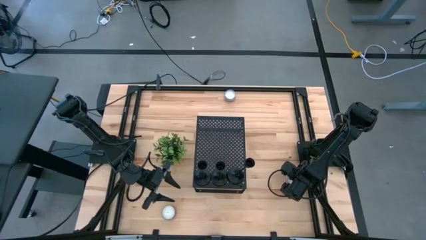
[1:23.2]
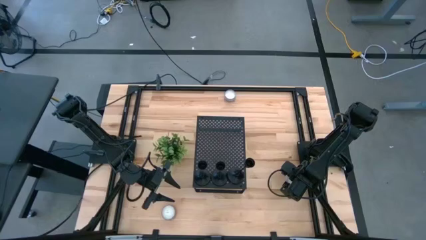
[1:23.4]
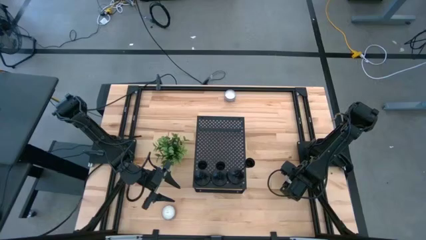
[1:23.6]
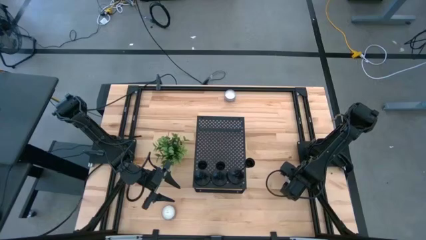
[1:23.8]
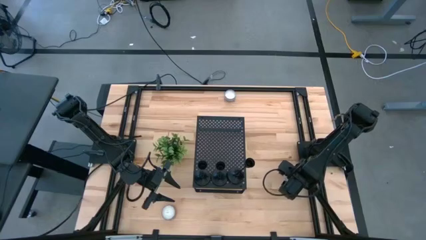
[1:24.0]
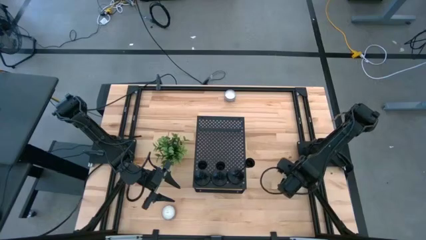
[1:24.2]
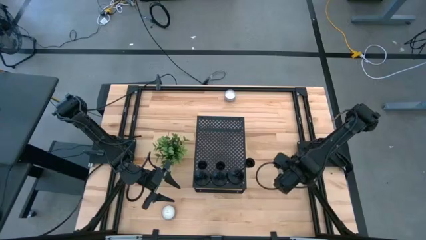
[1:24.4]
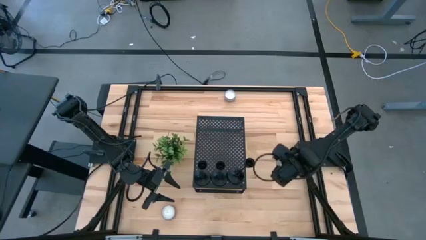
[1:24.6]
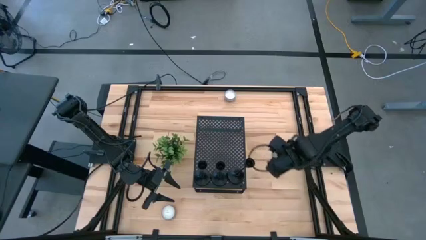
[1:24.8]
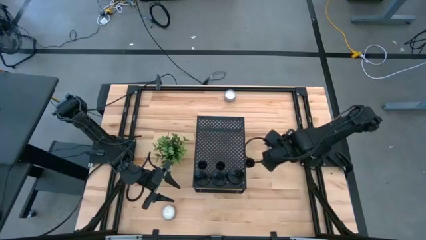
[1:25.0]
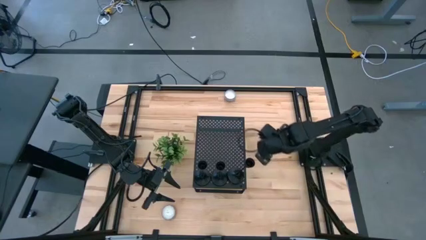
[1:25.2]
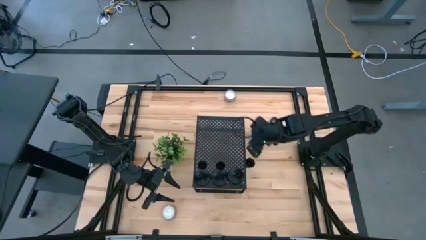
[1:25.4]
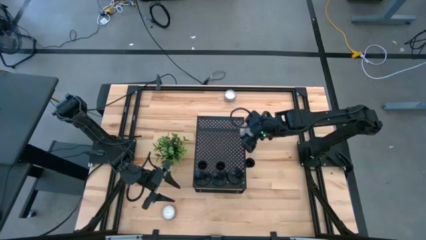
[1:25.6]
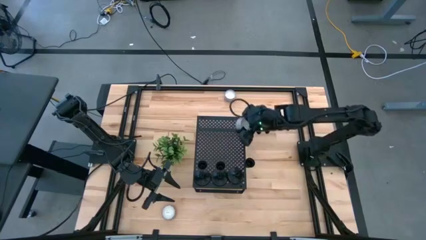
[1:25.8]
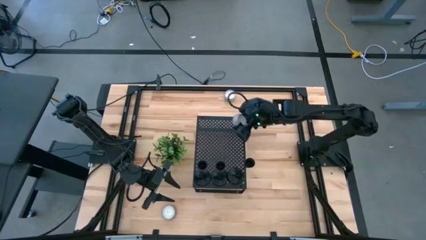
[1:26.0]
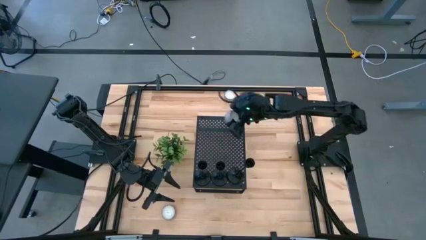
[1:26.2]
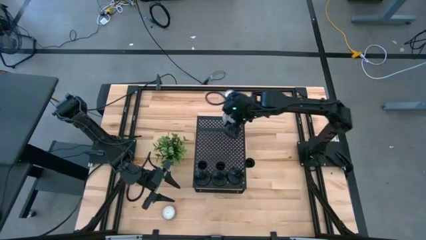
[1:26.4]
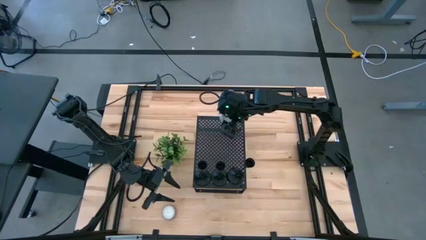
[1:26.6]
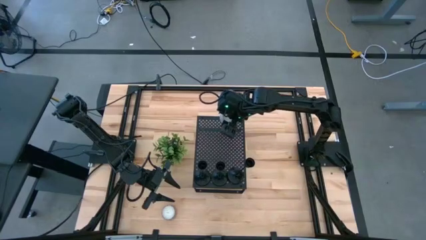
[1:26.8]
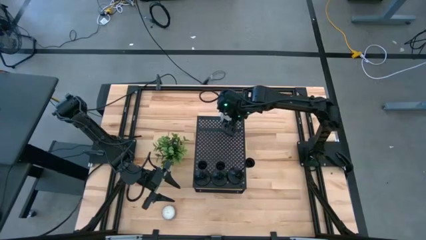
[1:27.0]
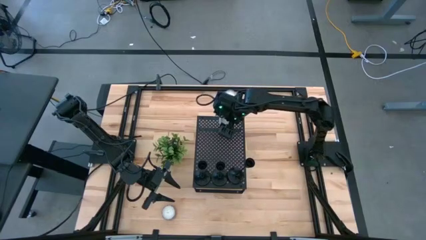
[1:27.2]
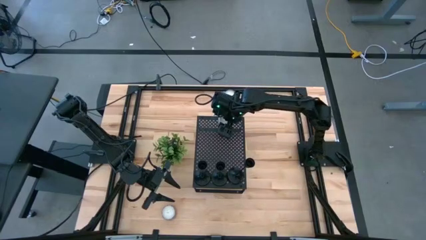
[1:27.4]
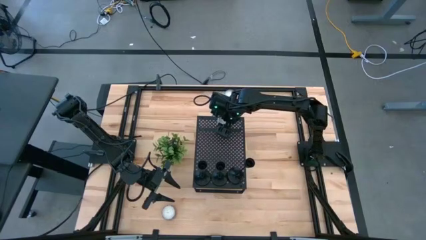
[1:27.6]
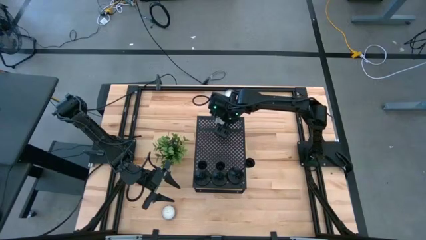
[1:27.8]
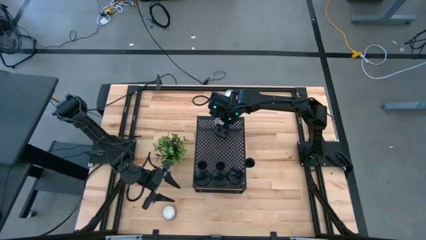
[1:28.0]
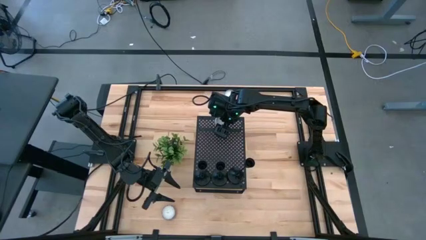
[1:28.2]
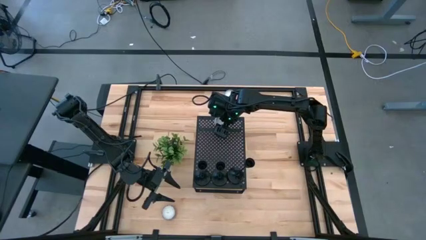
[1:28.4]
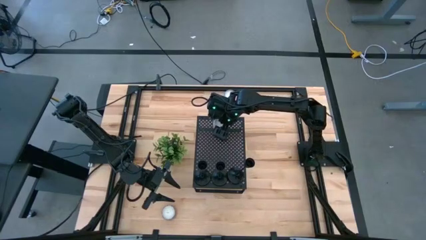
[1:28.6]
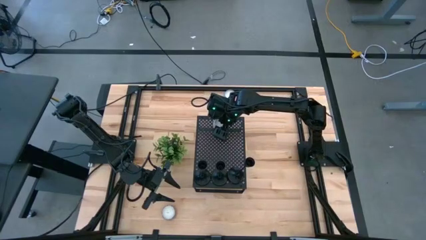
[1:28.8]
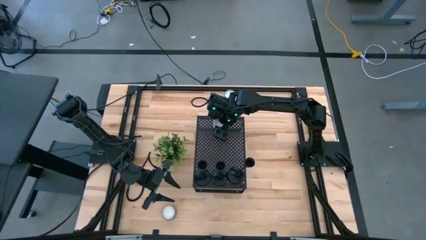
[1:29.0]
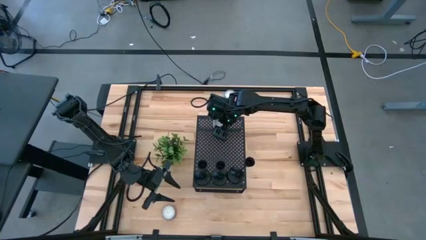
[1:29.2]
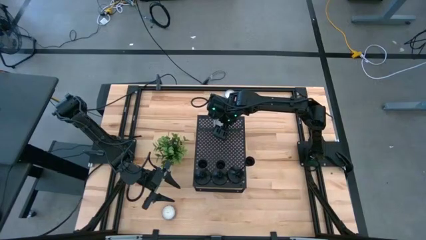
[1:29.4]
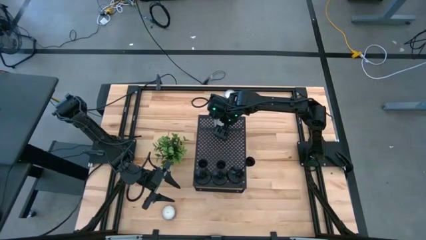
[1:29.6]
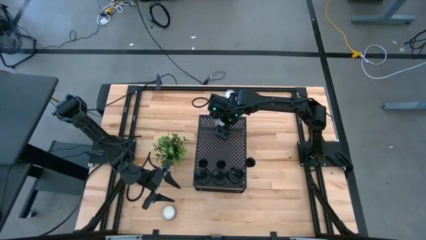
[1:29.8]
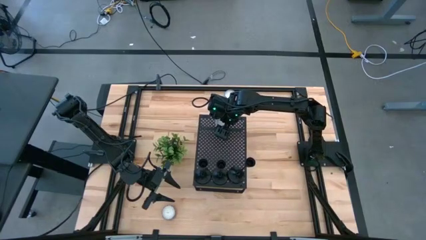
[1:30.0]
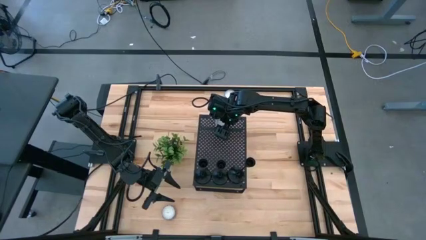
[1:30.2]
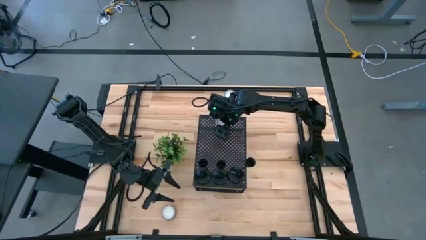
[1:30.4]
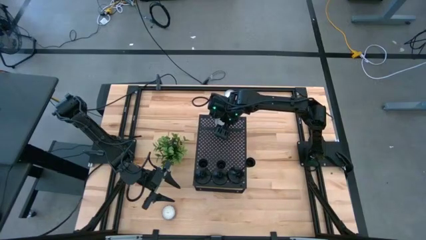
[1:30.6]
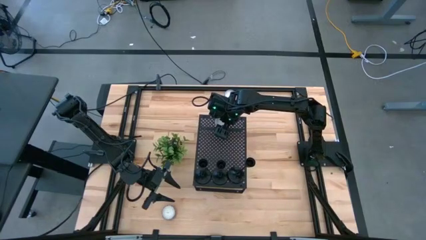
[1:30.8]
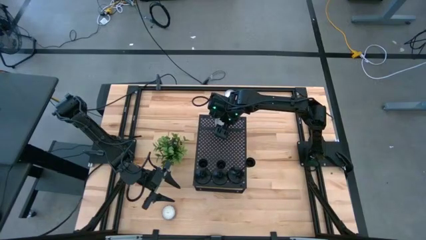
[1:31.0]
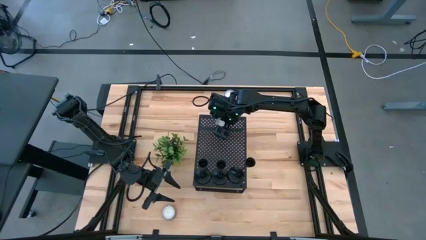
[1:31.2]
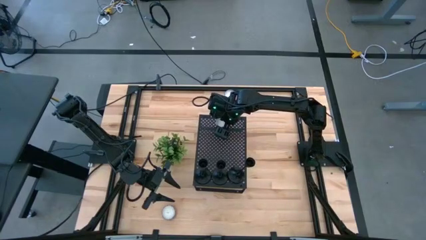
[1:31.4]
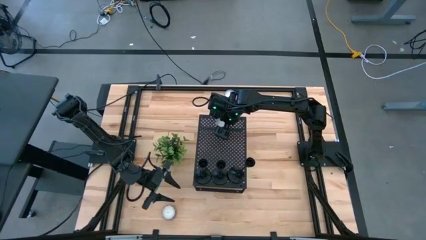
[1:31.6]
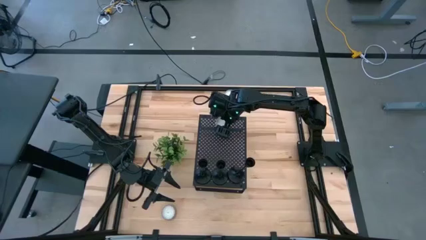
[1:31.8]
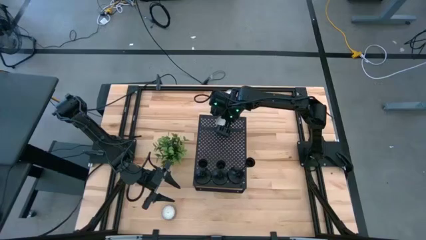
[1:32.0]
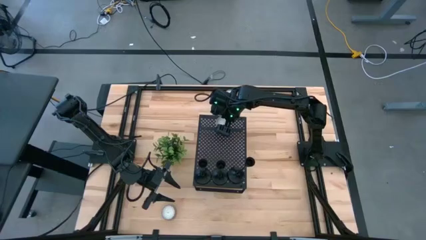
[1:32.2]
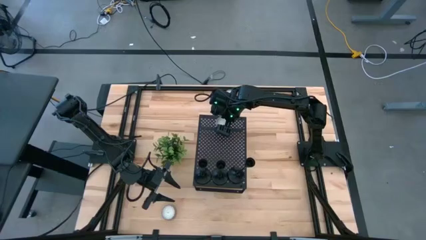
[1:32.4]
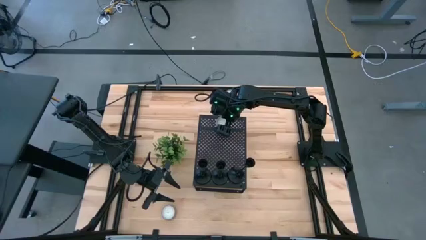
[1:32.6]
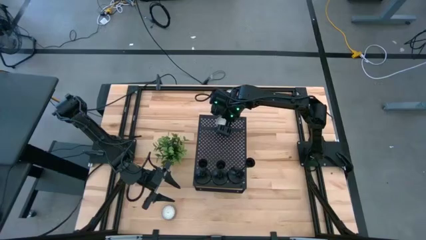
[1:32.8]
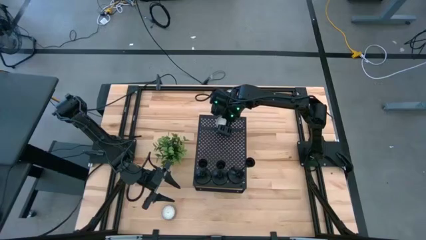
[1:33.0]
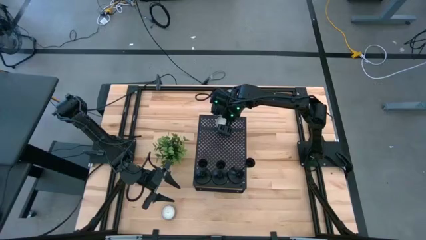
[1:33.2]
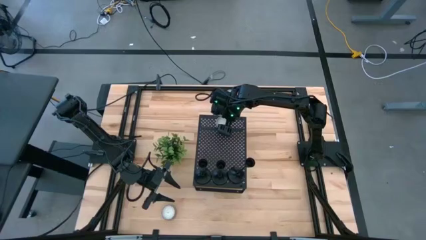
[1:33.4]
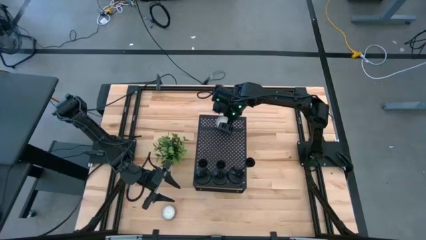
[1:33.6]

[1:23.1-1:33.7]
Task: Pick & Place candle stick holders
Put the blue patterned candle on the shelf

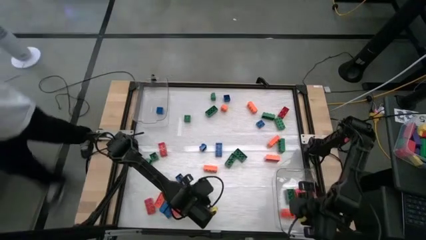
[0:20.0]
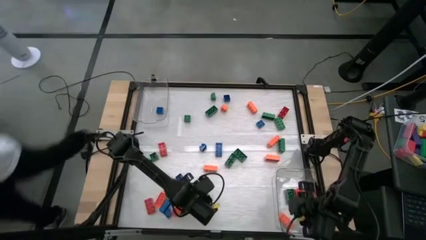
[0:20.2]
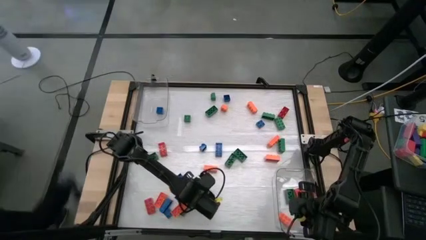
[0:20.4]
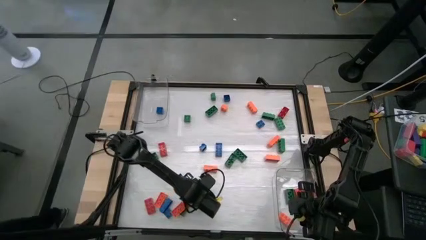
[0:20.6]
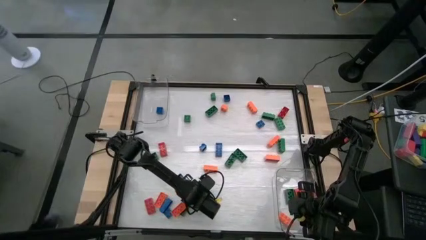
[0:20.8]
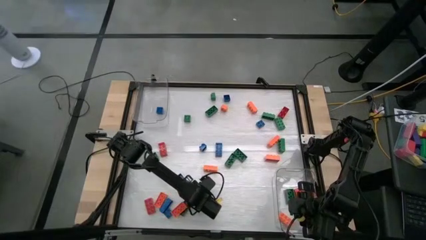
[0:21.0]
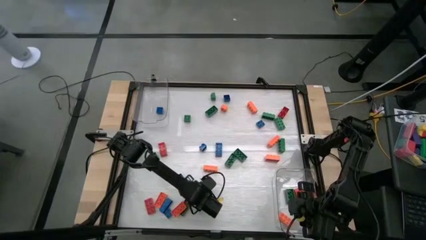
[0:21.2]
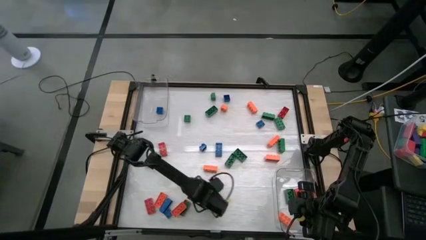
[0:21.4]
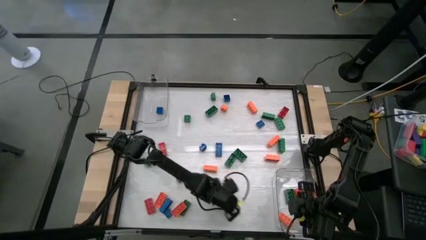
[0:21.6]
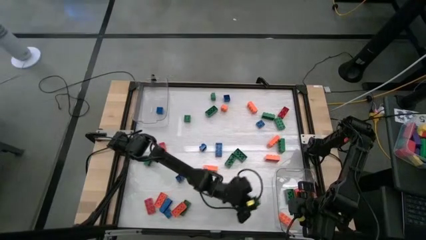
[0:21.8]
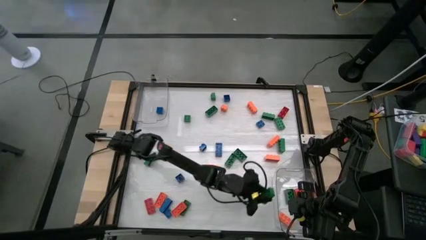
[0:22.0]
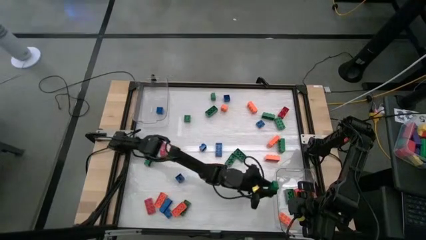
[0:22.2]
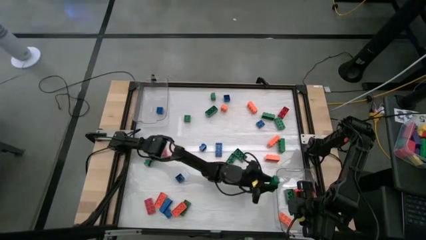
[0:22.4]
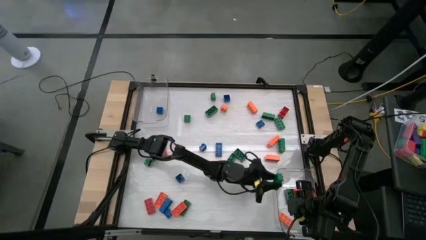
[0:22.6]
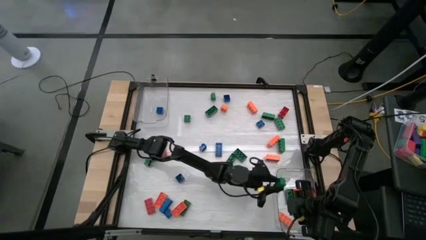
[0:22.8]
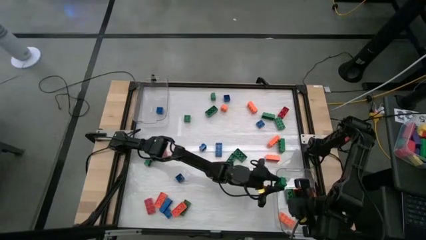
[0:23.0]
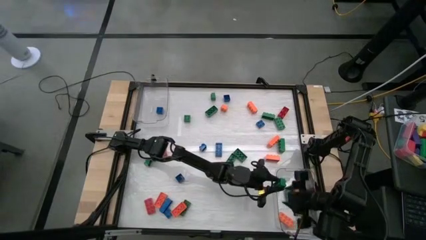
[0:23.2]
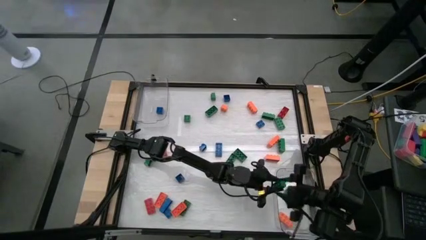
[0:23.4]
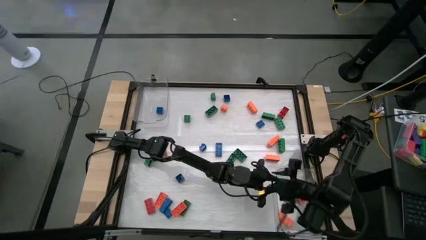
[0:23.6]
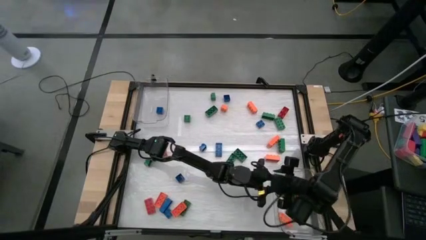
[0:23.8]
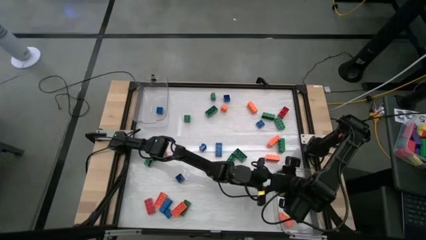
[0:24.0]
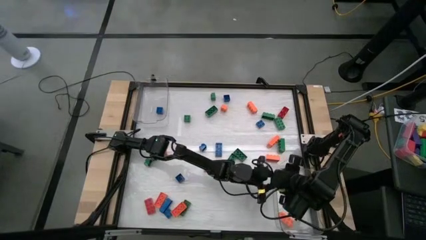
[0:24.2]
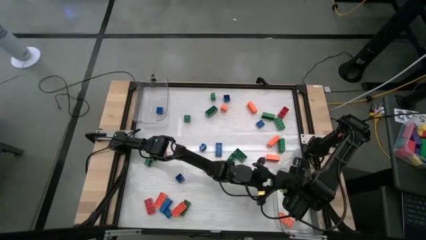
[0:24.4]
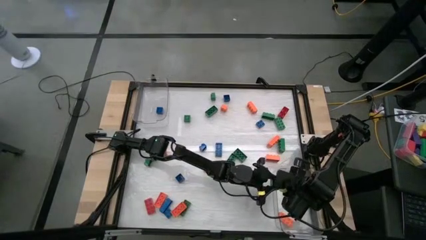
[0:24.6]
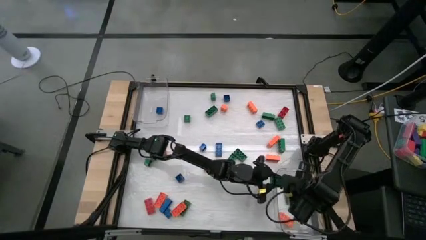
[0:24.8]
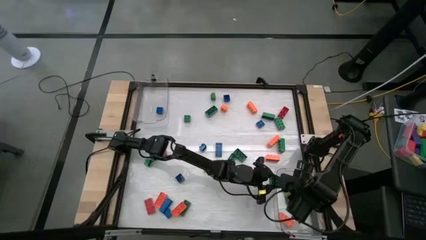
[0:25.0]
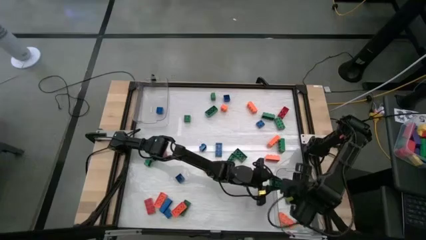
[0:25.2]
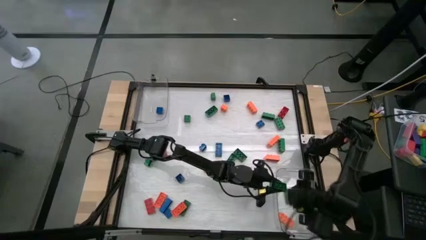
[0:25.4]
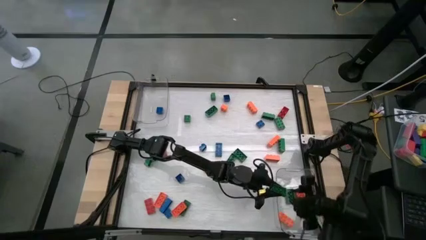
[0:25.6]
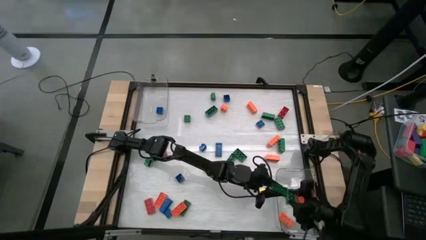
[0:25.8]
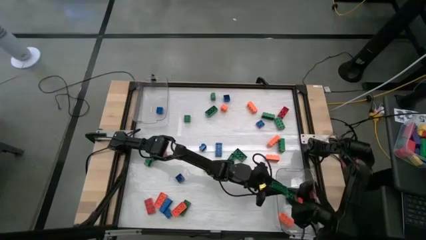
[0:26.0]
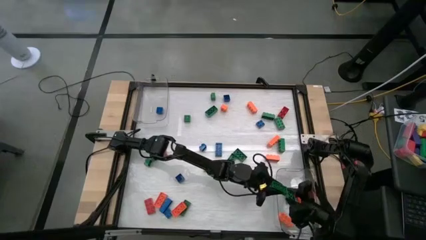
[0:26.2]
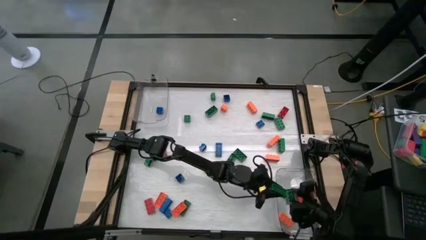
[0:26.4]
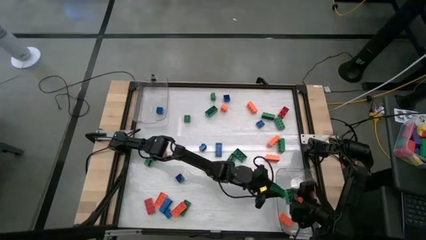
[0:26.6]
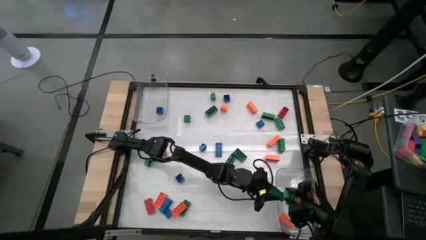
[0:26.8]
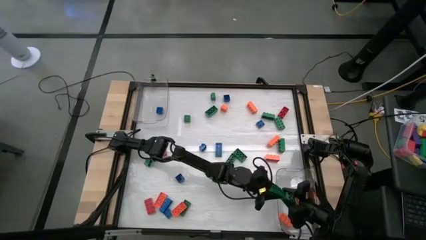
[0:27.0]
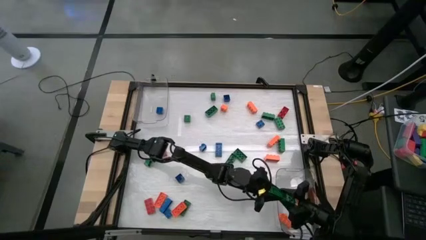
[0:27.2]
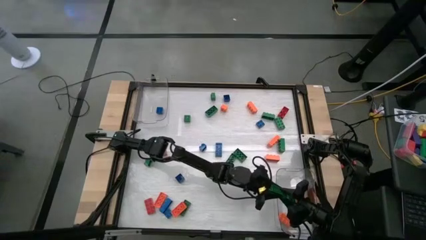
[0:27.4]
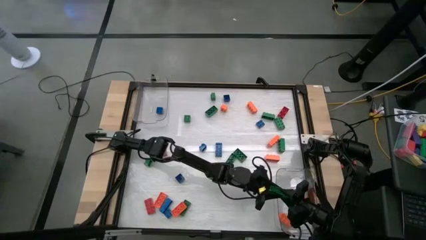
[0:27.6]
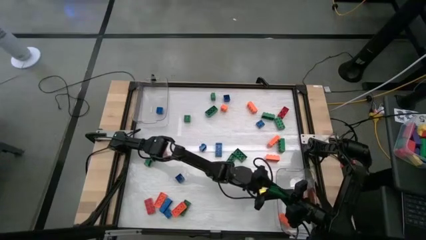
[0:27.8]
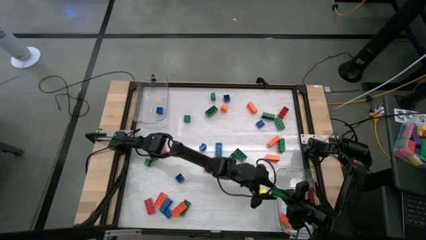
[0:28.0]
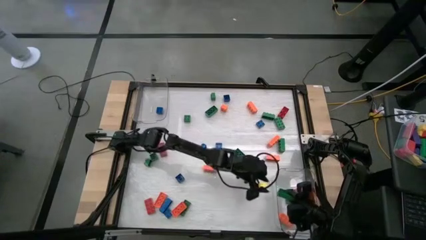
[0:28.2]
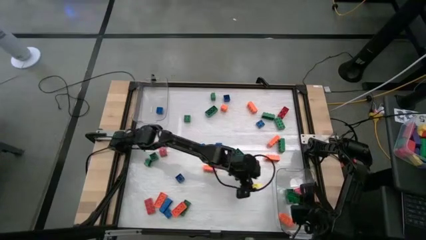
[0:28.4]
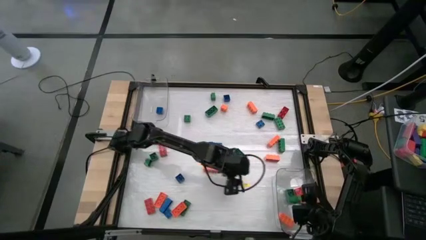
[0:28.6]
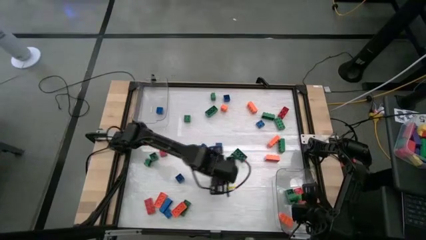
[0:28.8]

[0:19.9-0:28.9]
Task: Sort blocks by size
Put the 8 stud green game piece into the bottom transparent bin
